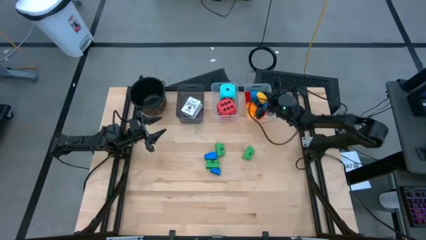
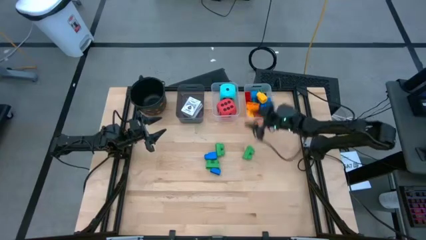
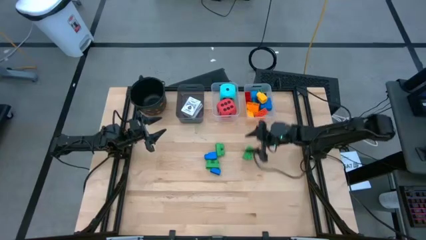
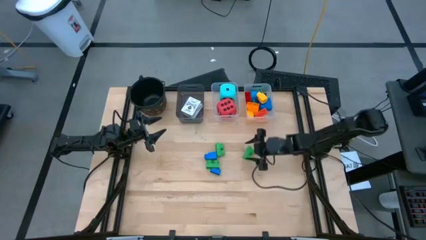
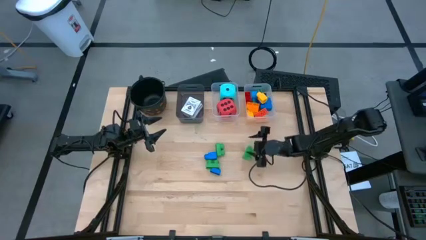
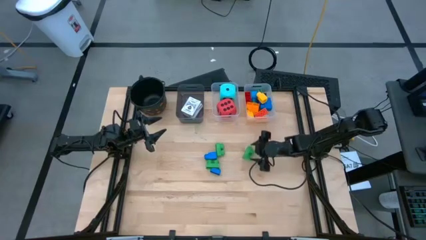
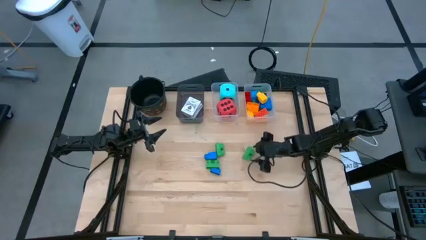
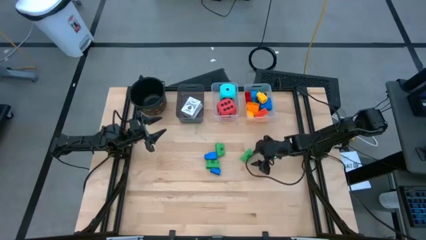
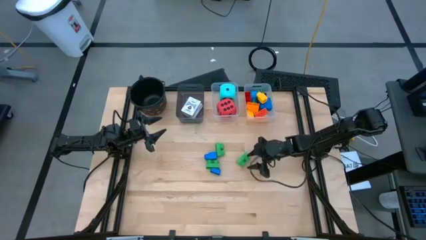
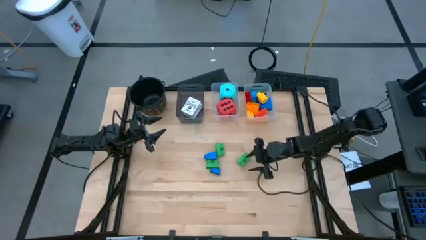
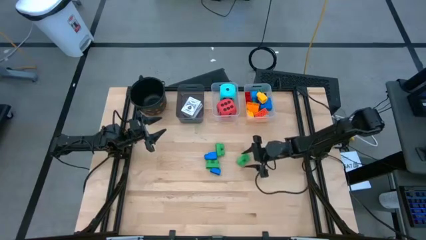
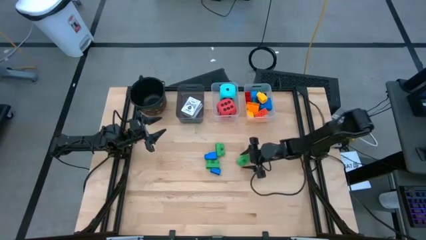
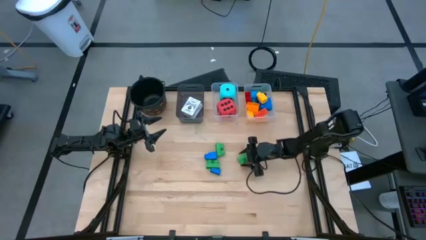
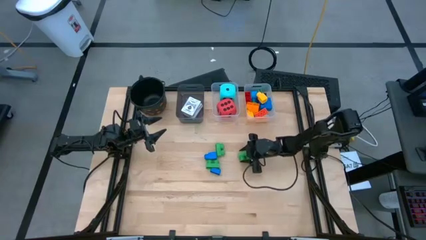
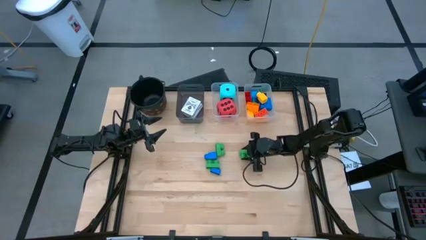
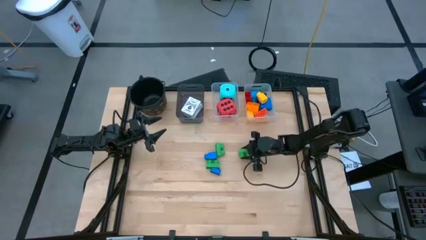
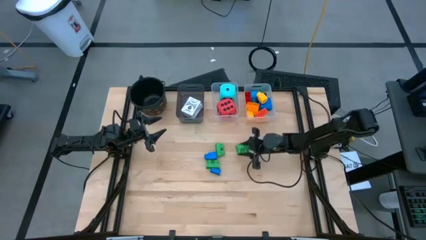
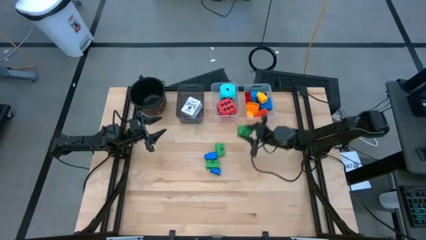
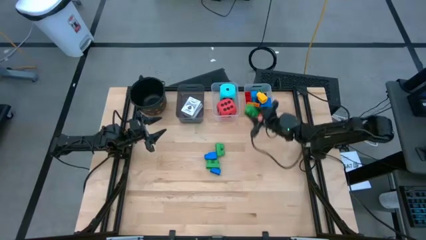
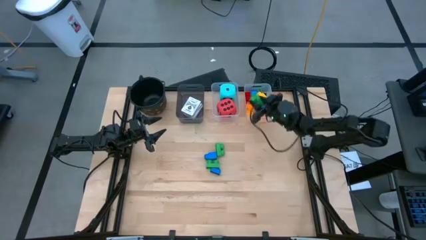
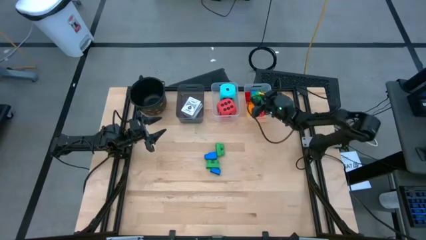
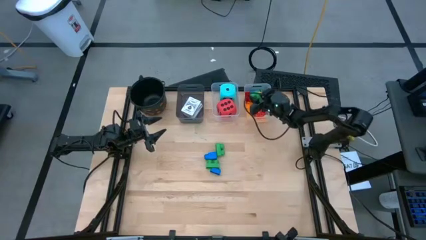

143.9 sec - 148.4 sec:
Task: Pick & Place Toys
Put the right green two stud game piece into the right transparent bin

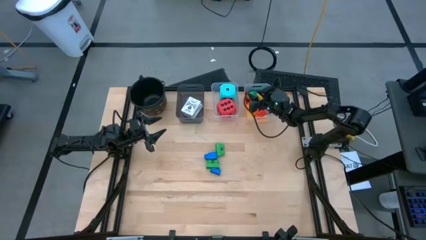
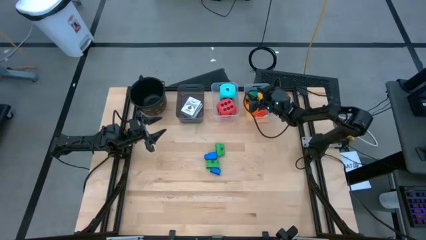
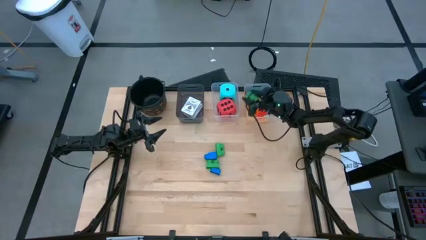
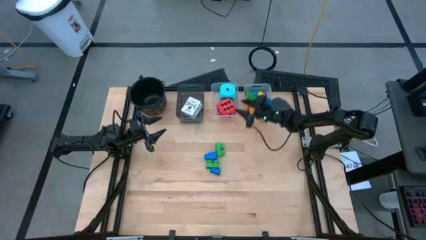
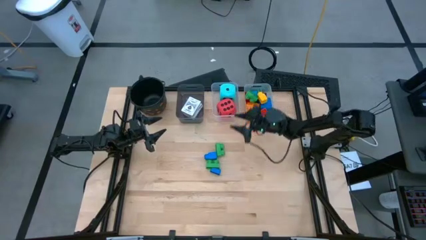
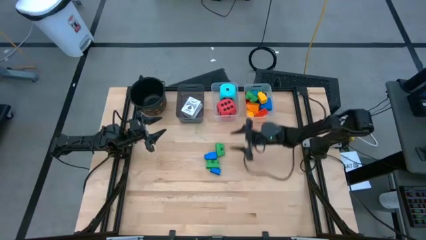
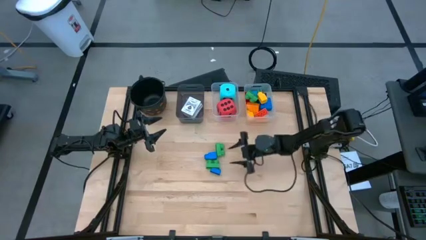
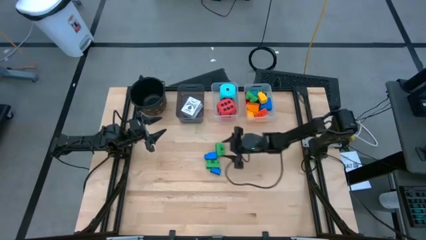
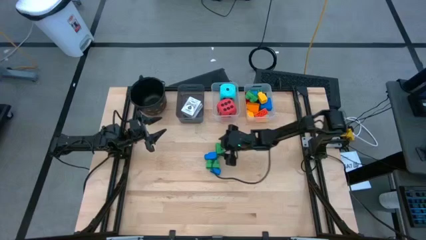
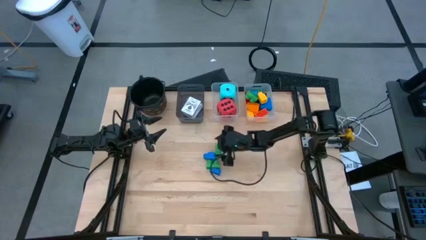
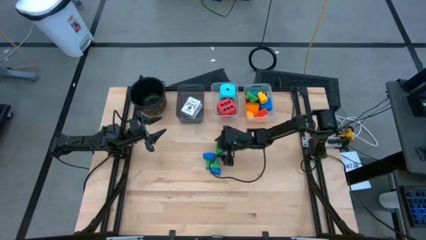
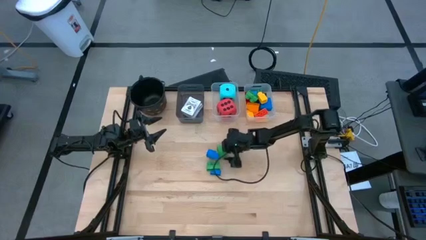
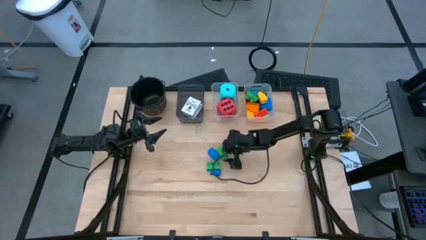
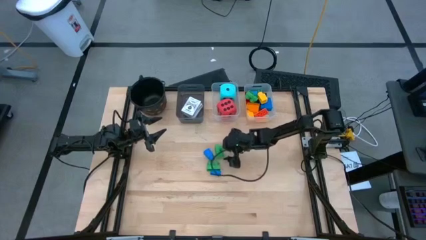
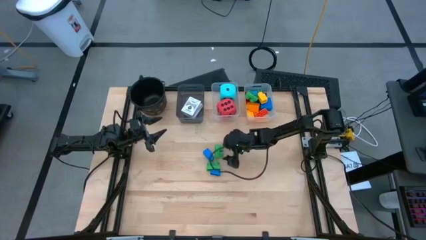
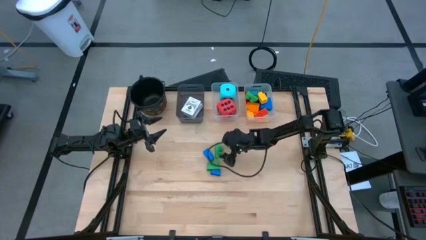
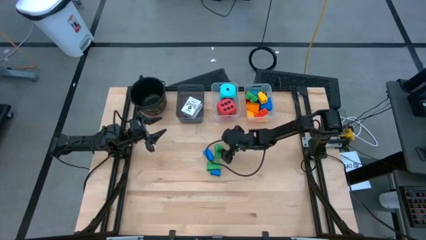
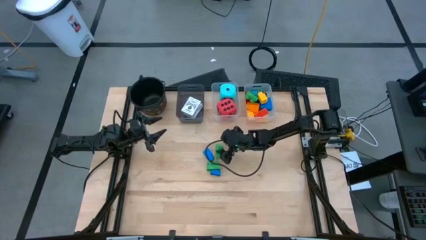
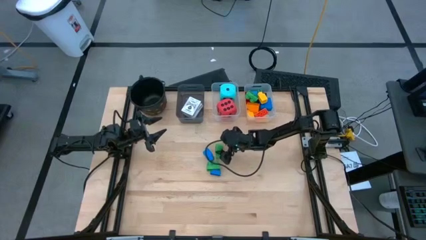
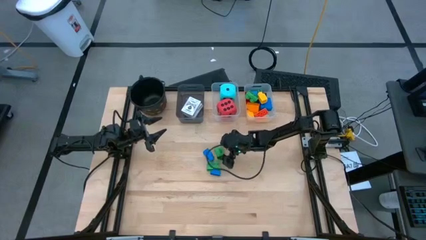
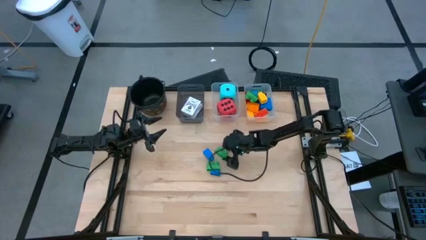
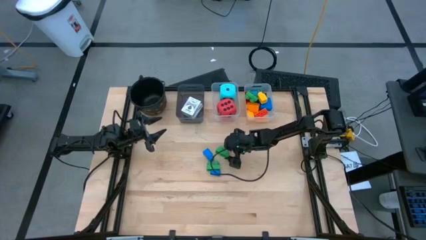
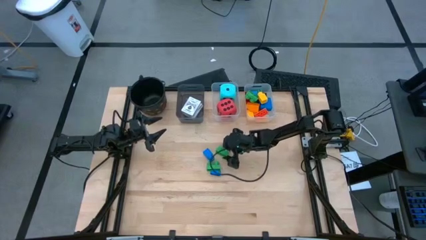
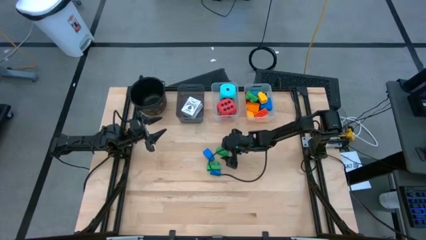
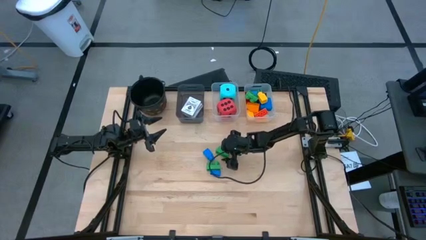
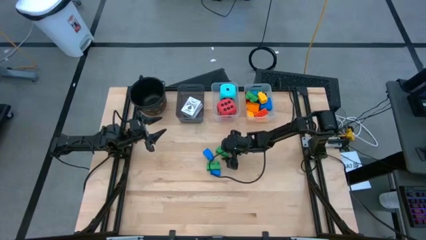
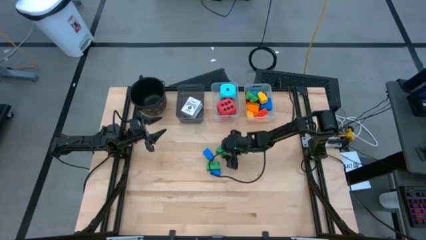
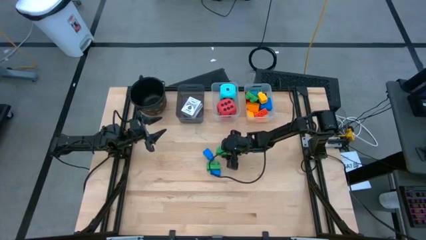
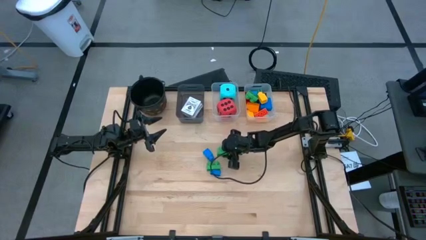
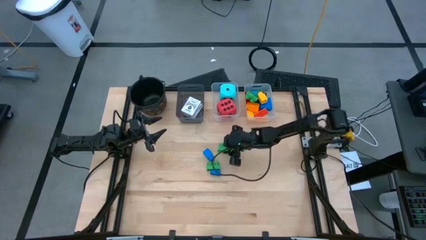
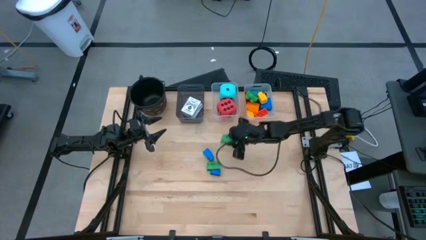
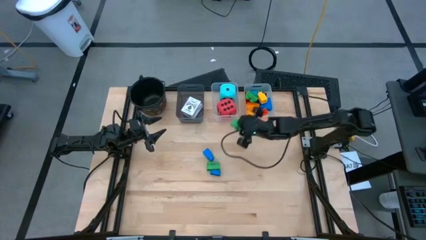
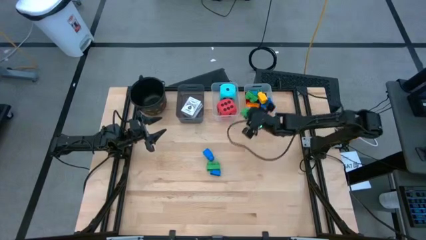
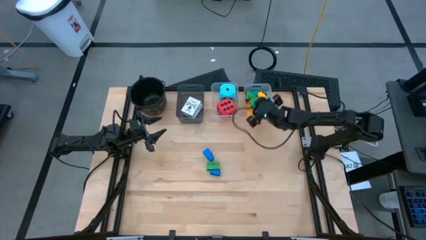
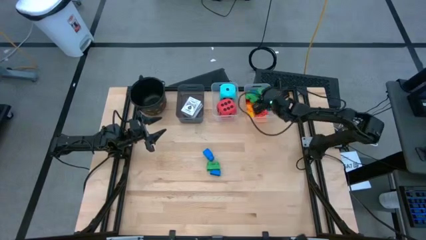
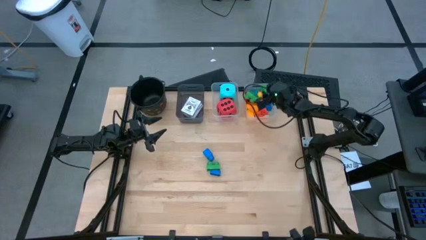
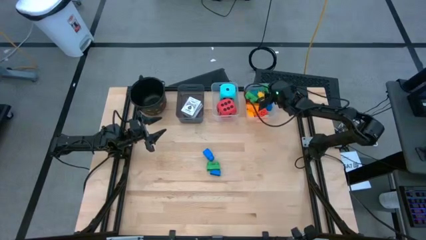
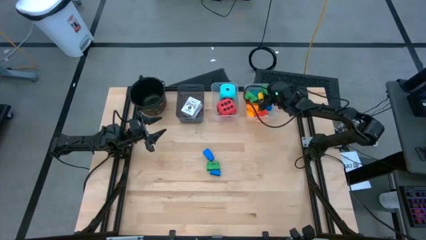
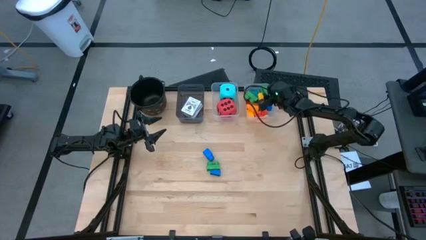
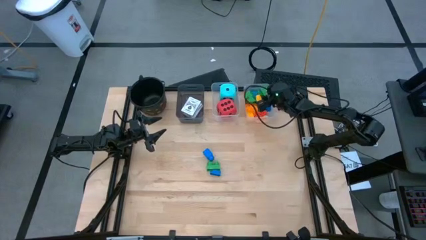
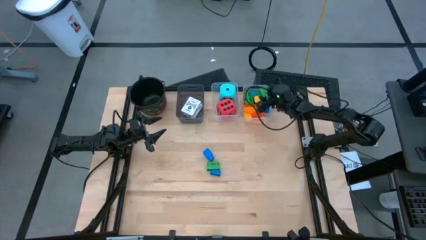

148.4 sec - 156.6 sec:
Put the top green two stud game piece into the right transparent bin
